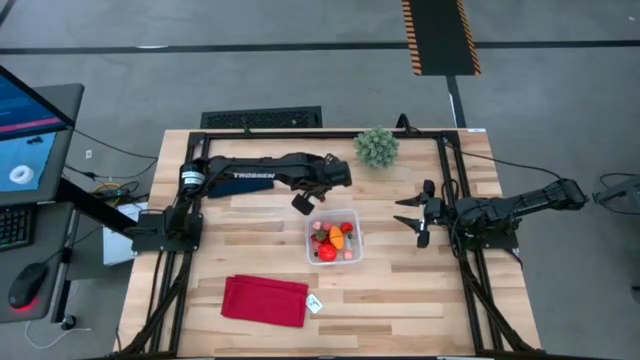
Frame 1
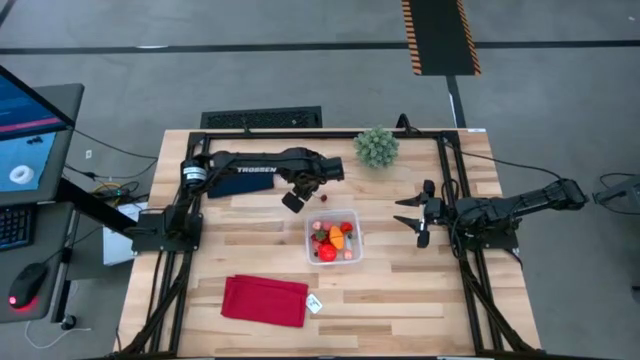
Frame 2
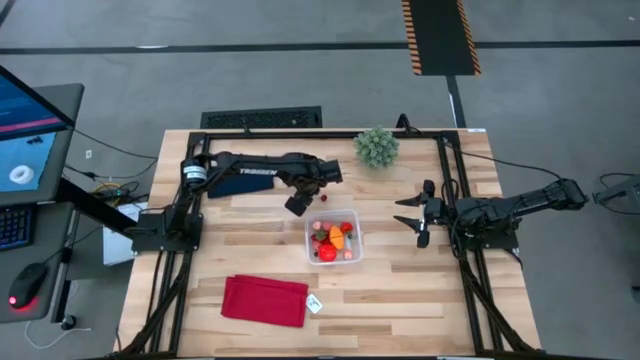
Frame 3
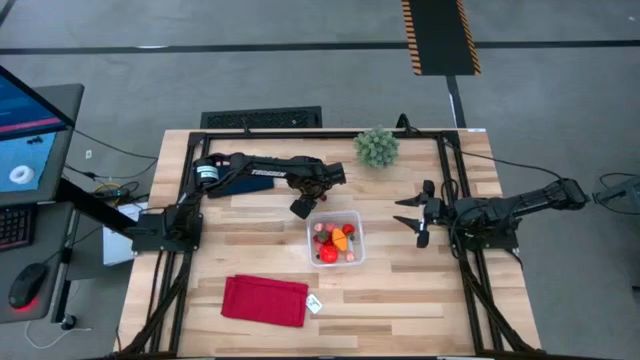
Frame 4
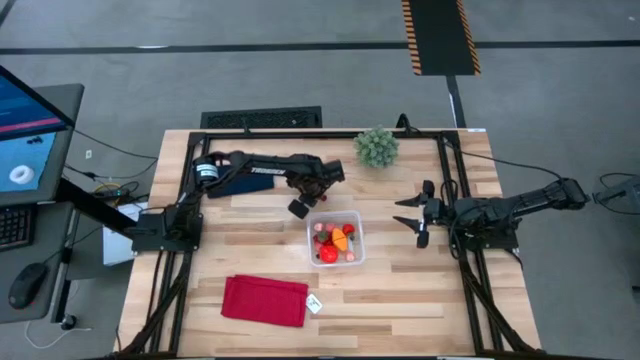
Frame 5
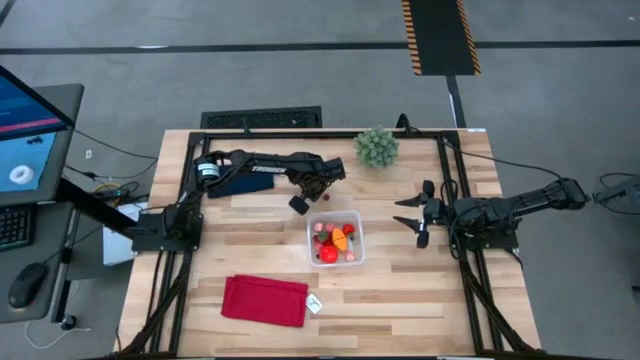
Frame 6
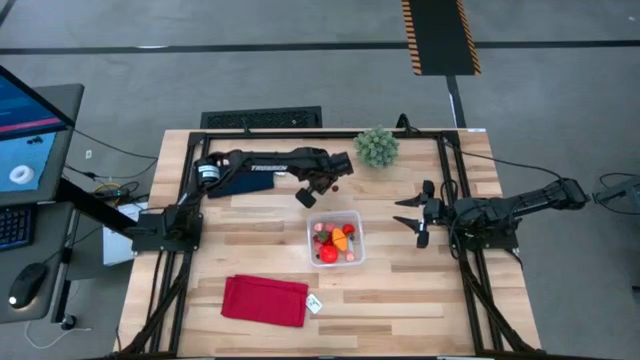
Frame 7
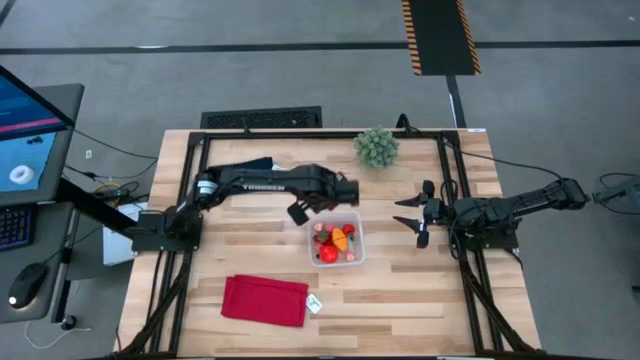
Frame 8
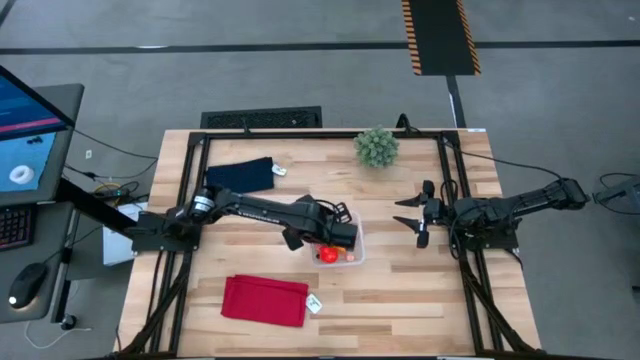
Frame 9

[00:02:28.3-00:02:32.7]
Task: Pick and placing Produce into tupperware
Put the red cherry into the transparent bin

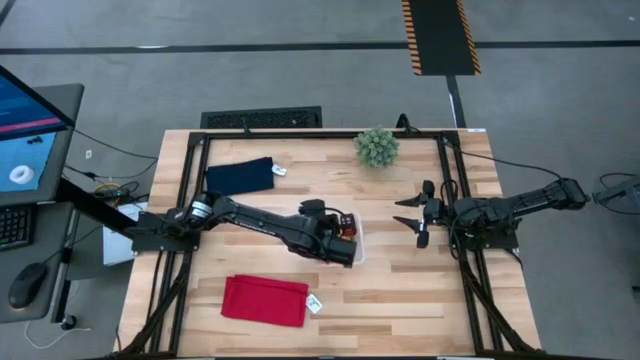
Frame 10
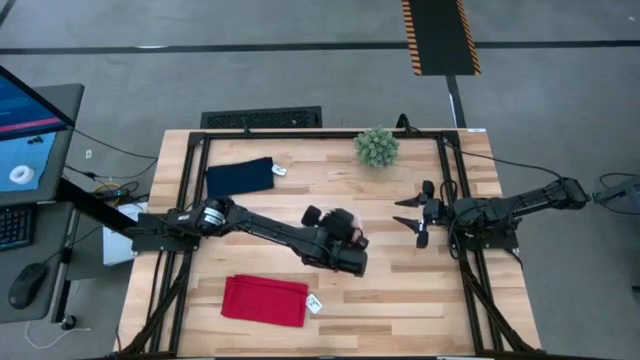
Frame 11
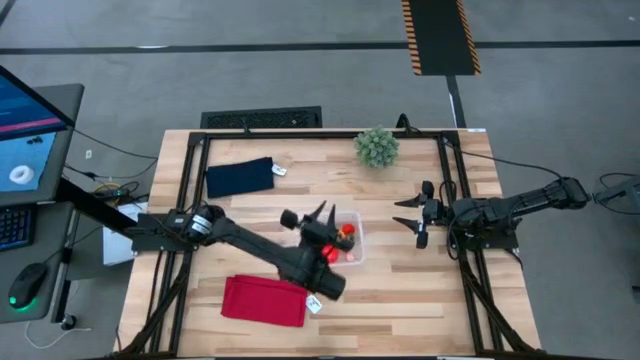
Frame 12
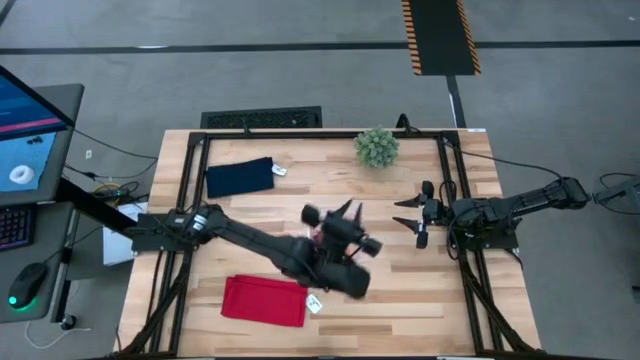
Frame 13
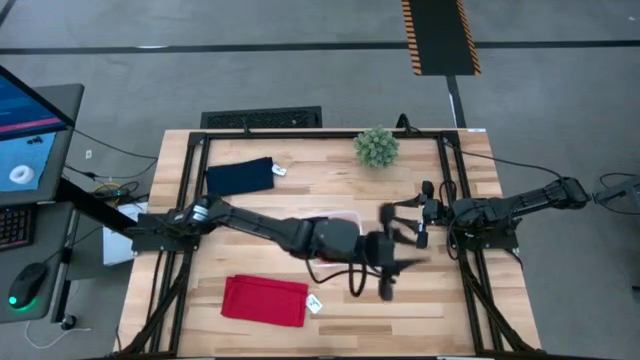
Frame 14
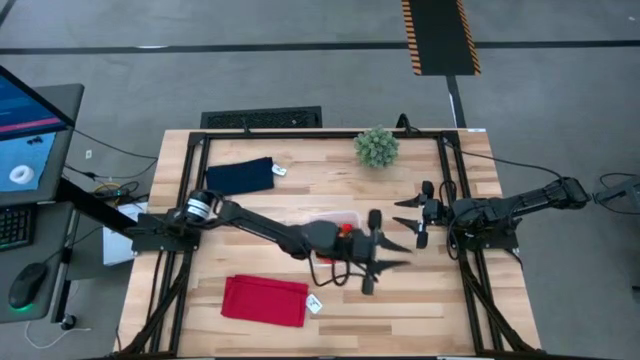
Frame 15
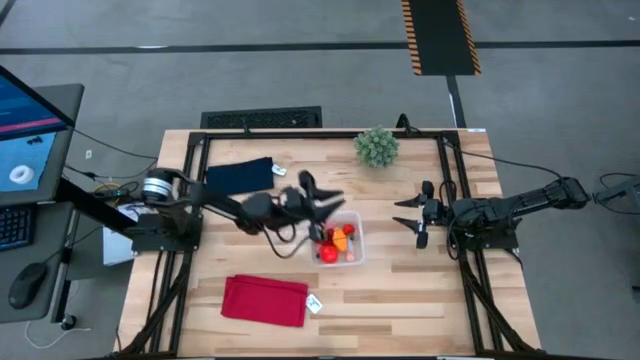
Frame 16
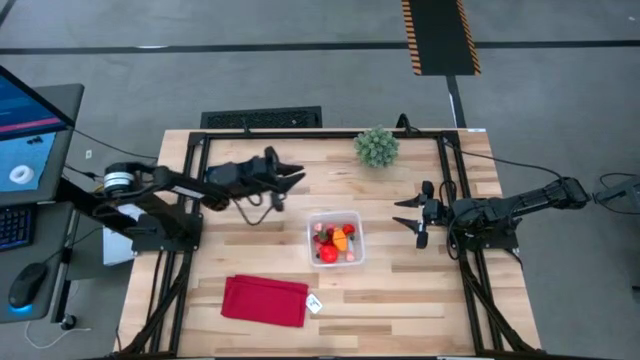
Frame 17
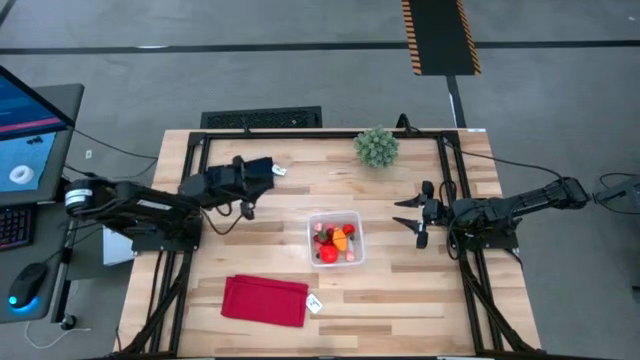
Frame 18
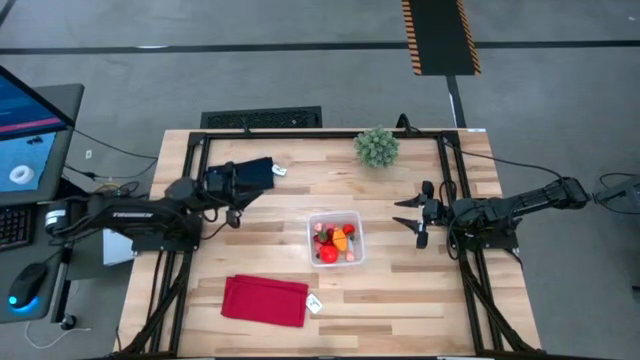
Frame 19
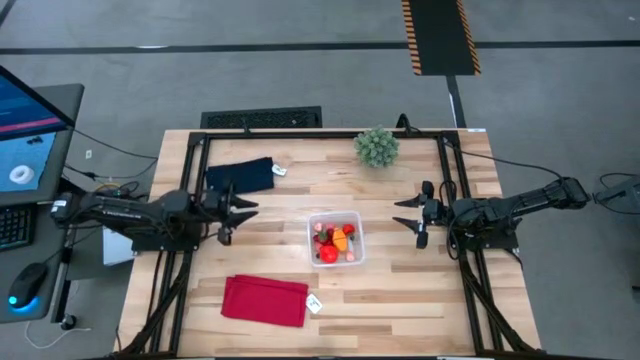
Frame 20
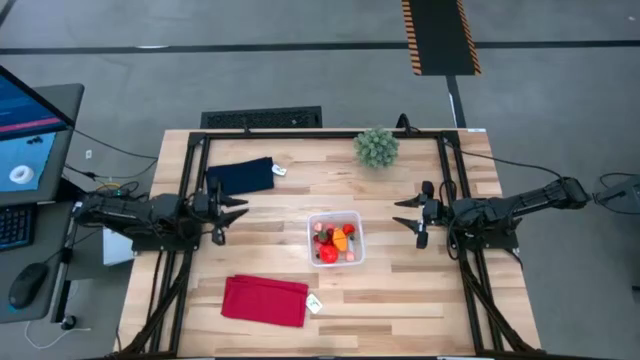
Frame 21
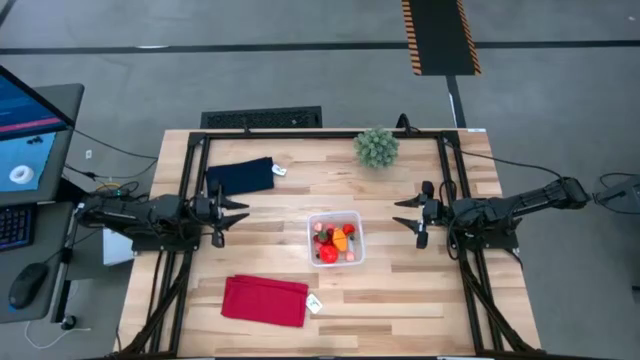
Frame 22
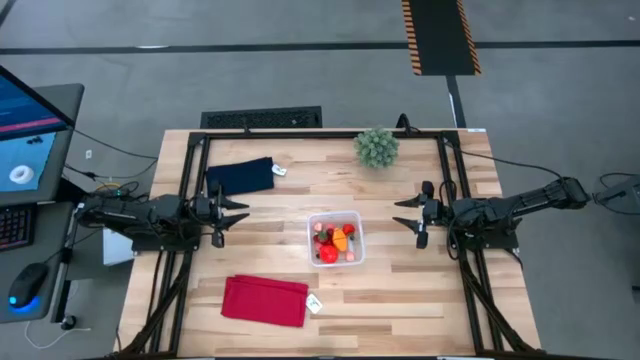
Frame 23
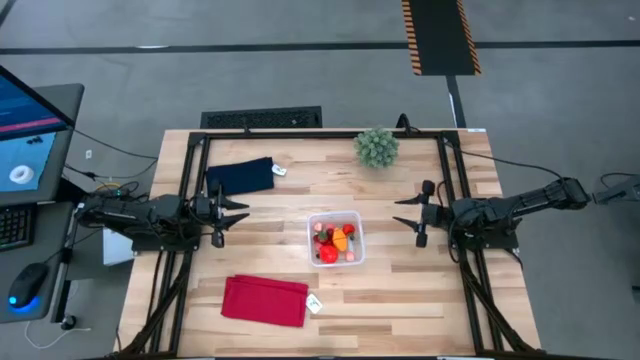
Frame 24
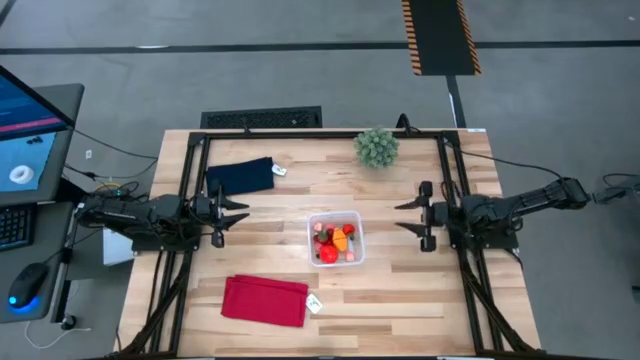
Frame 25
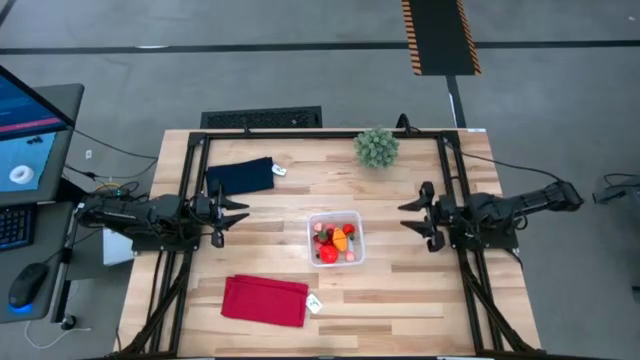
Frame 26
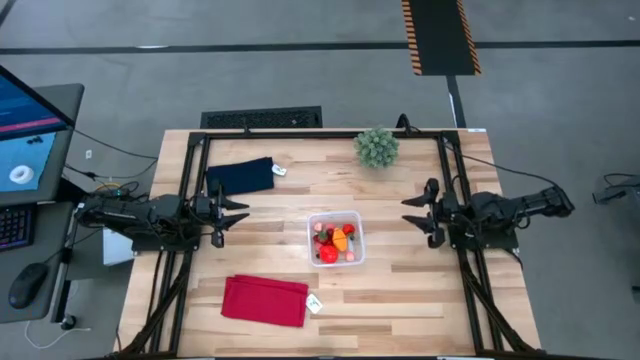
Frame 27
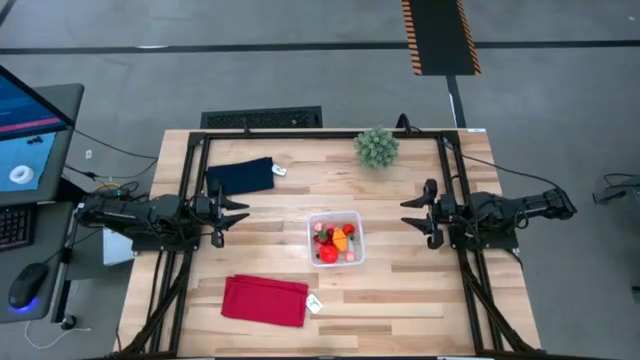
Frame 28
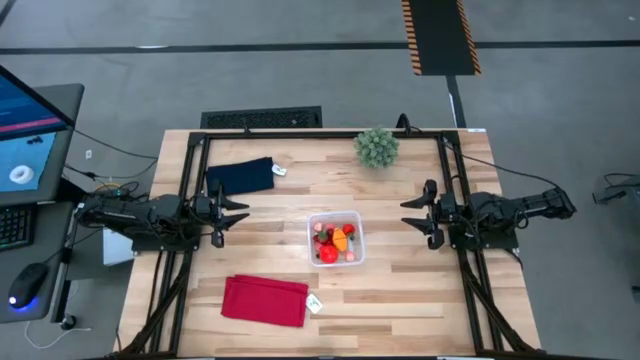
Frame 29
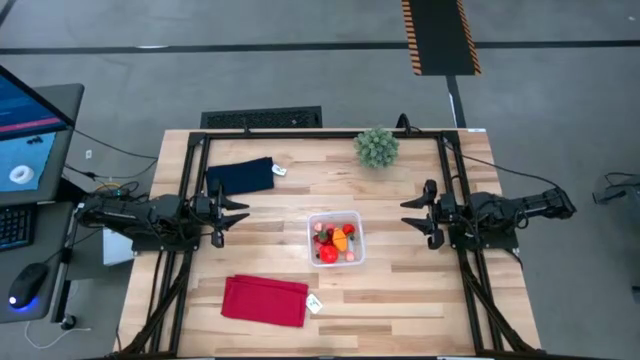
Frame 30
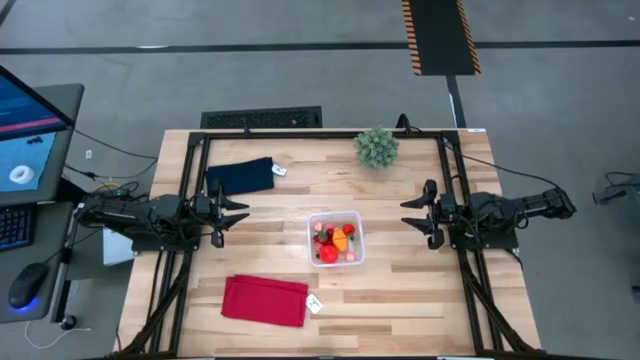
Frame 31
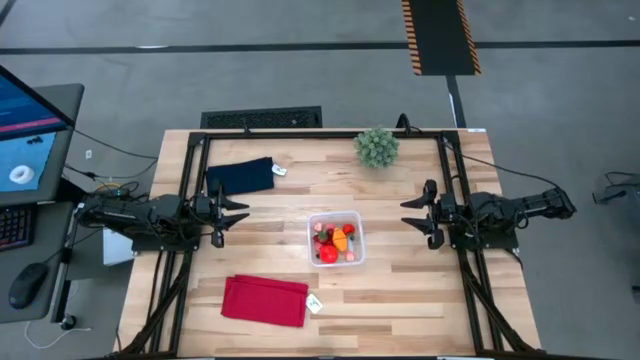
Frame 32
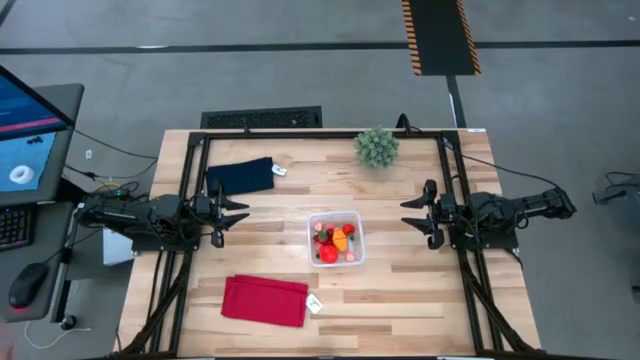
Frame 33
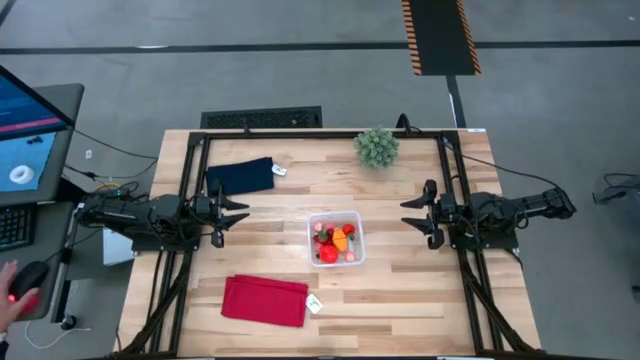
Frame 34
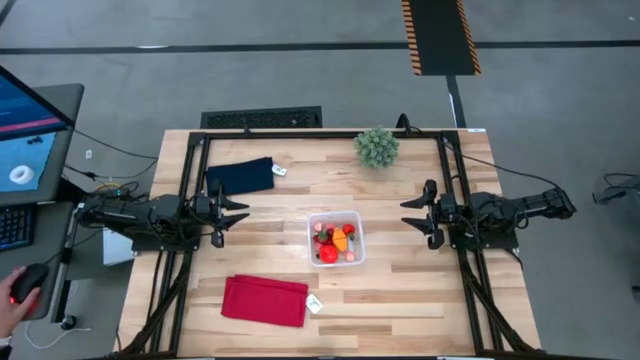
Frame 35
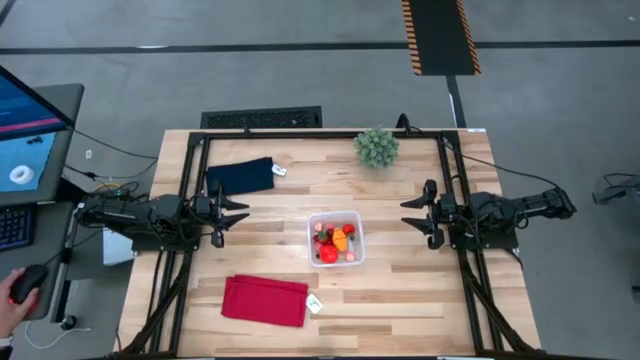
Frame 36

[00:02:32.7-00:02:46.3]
Return to Home Position
